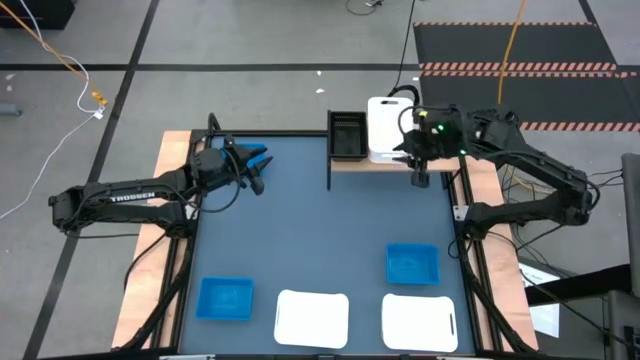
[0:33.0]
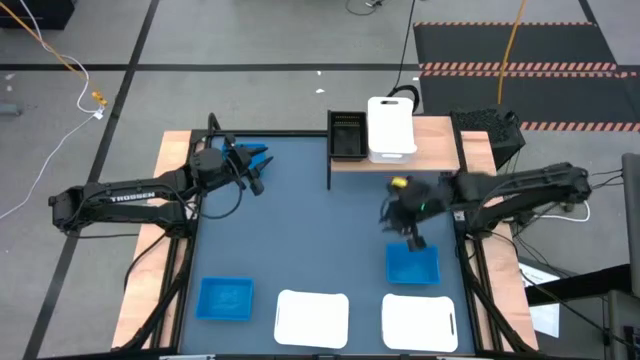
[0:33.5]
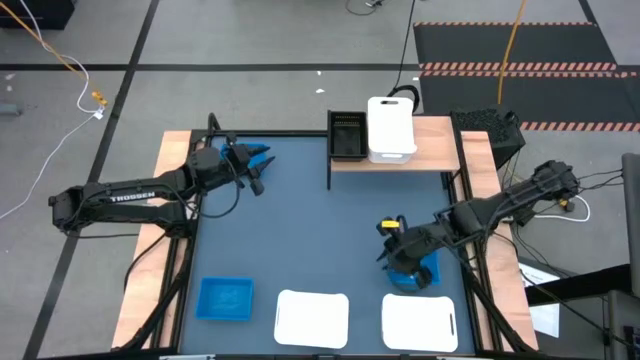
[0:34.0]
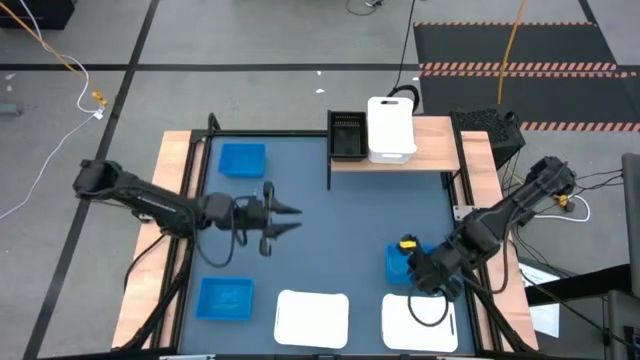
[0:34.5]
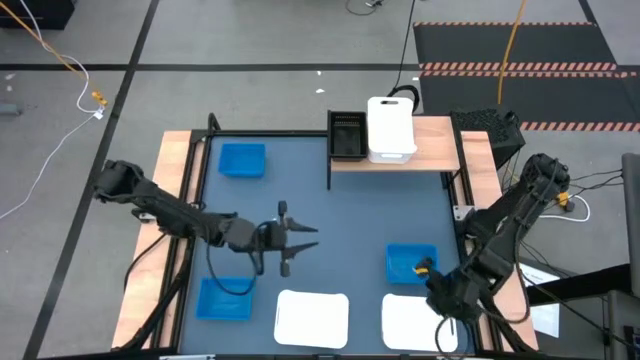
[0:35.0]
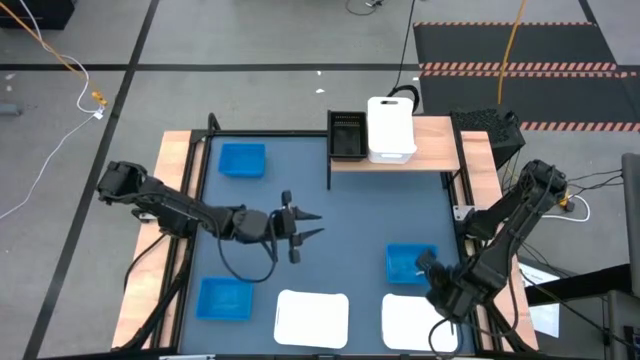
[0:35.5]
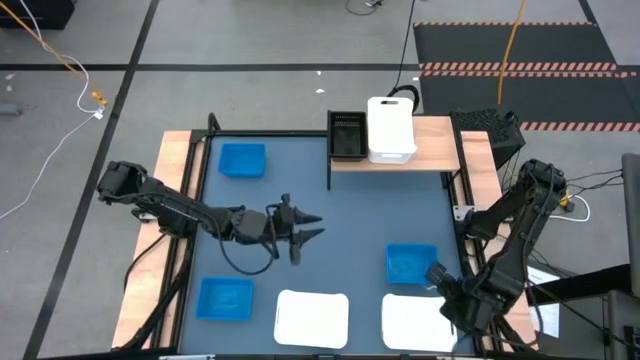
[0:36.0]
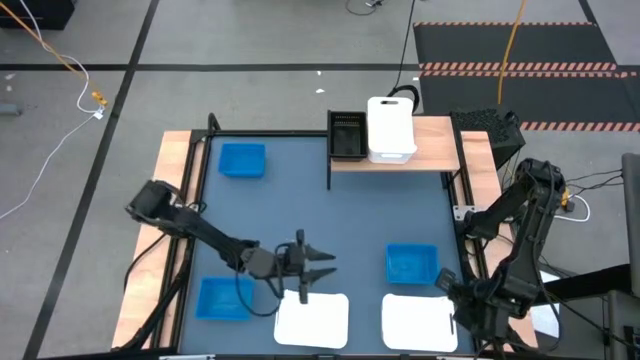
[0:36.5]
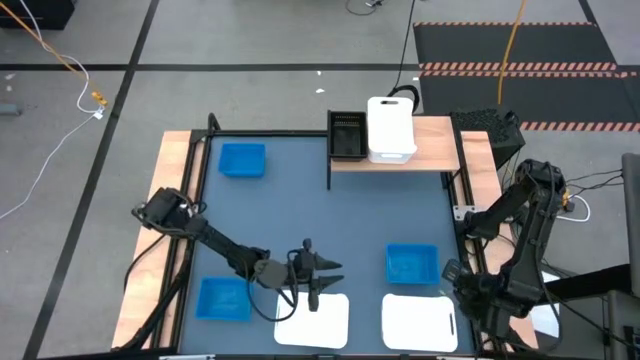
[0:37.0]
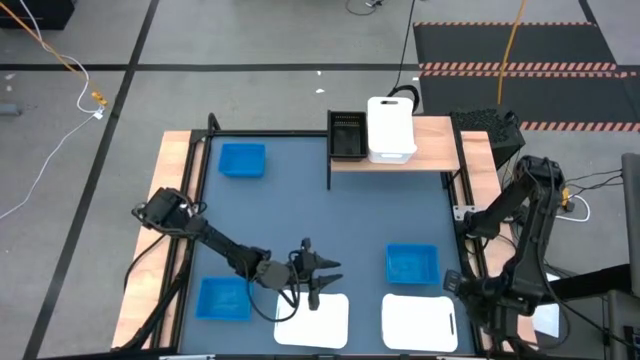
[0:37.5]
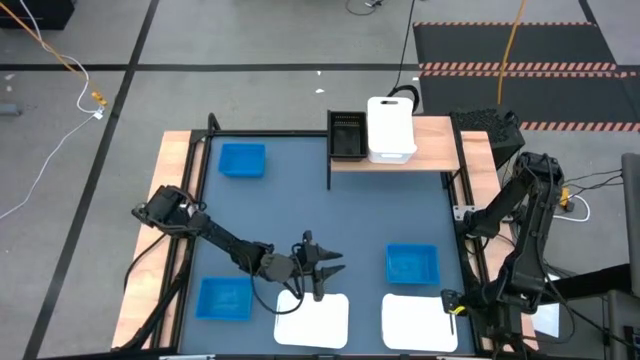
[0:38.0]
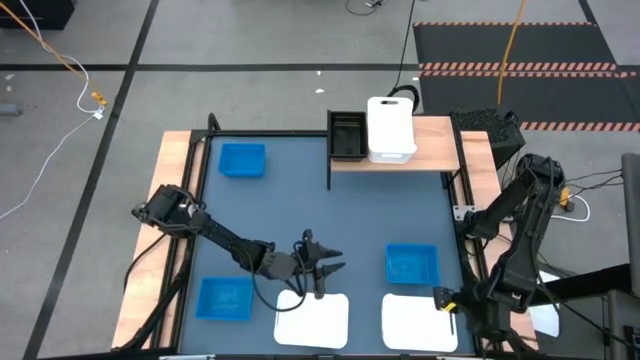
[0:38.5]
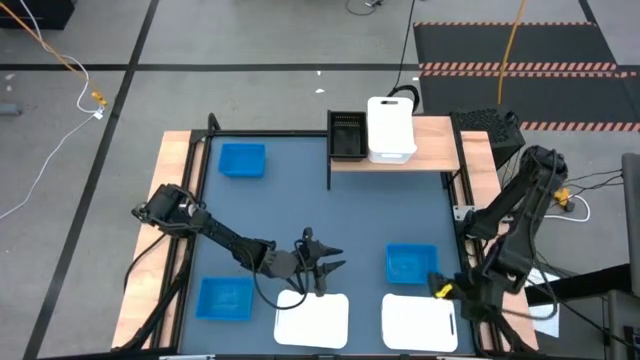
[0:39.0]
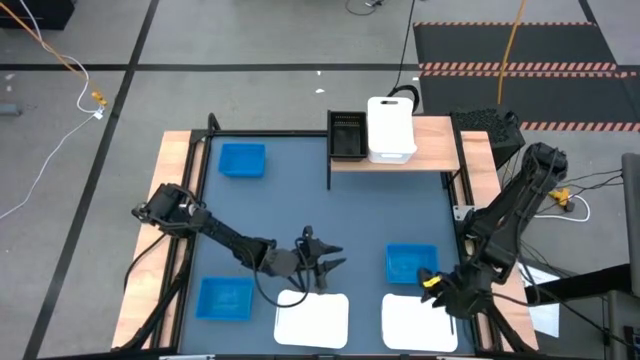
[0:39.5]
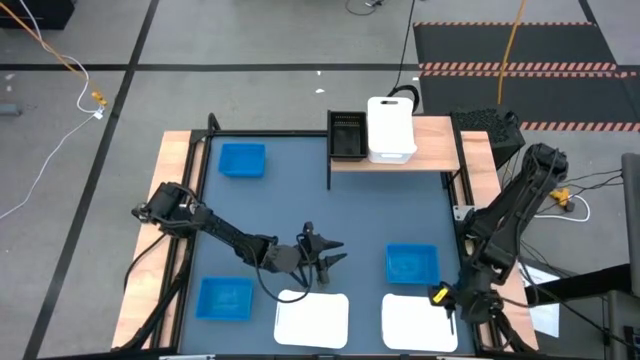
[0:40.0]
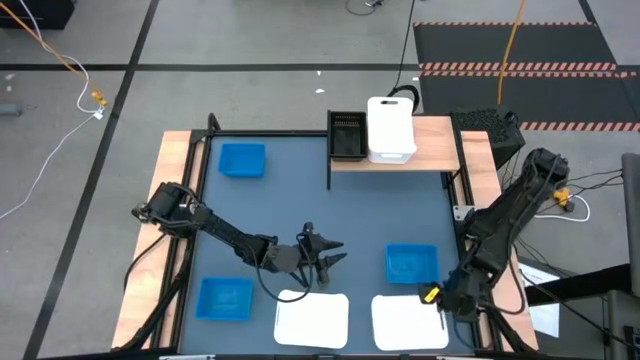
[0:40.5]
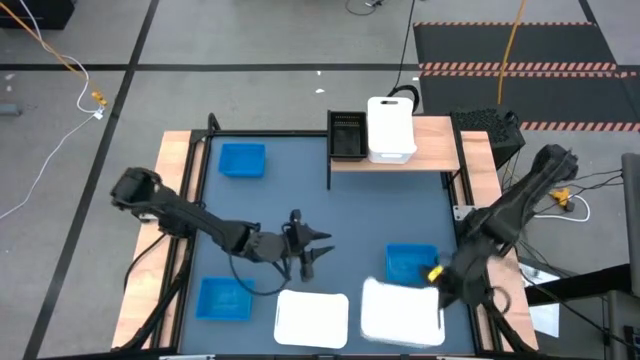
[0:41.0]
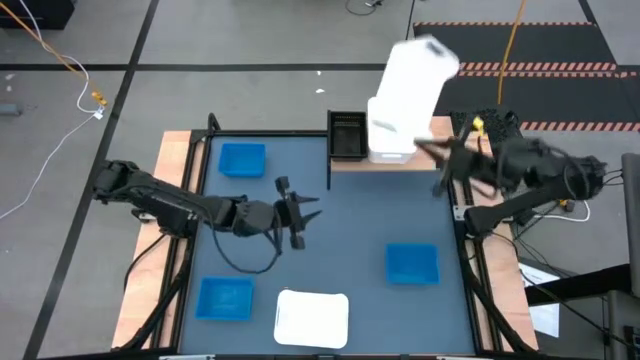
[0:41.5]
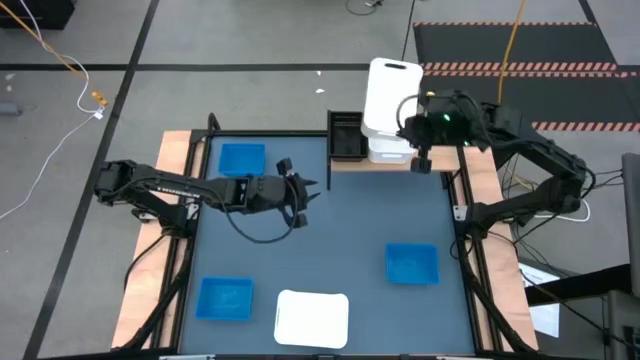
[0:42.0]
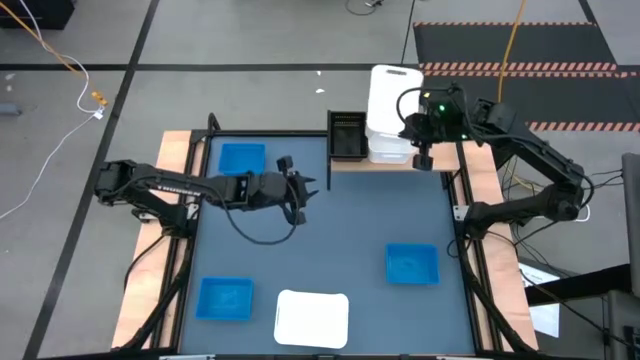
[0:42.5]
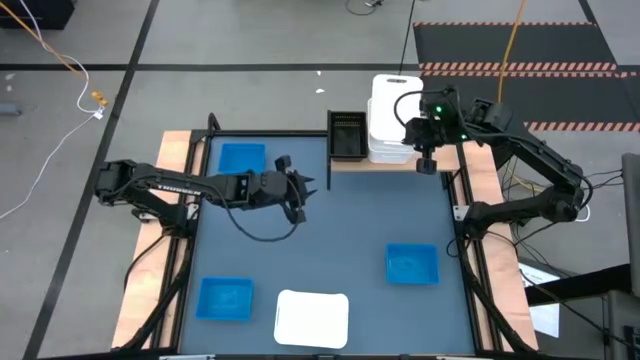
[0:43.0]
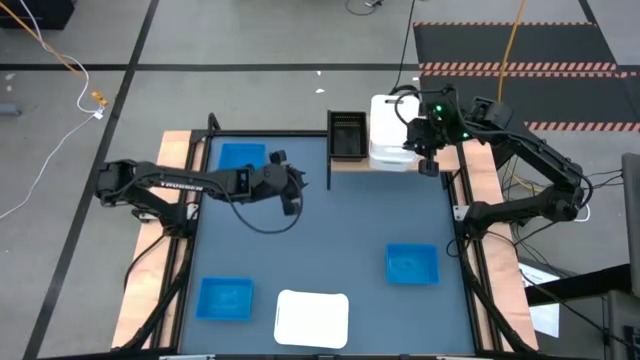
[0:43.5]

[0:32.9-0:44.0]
Task: Stack baskets on shelf by color
Stack the right white bin on top of the white bin into the shelf

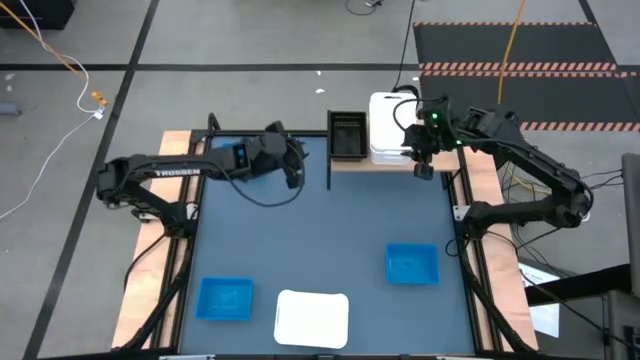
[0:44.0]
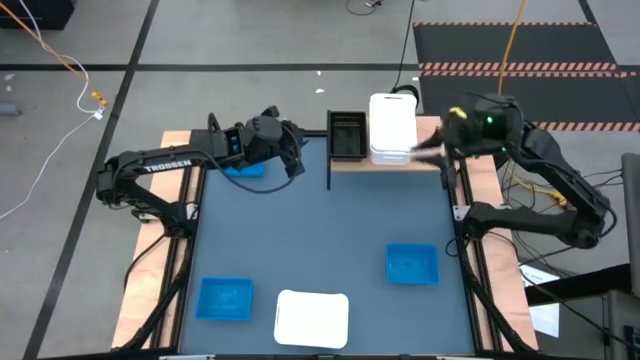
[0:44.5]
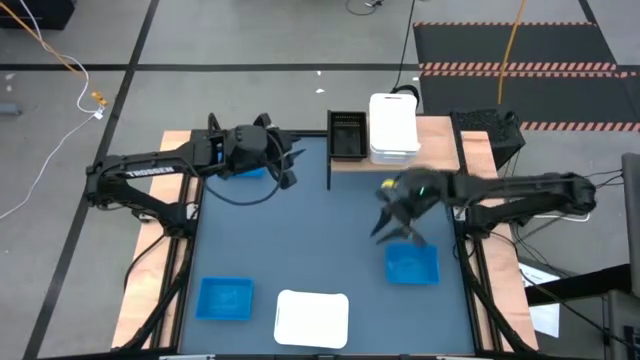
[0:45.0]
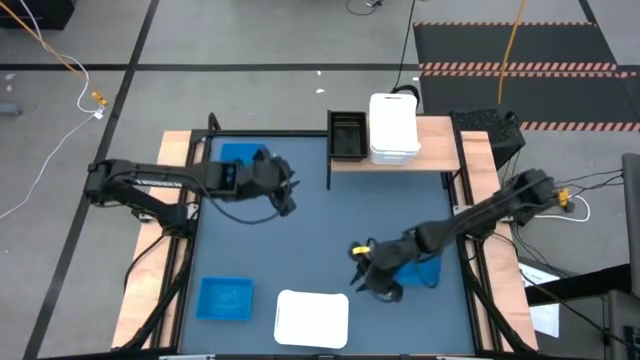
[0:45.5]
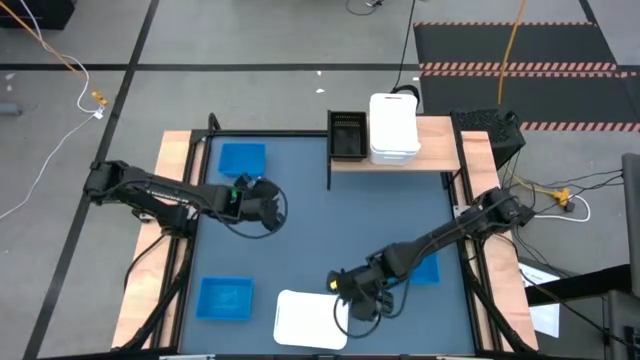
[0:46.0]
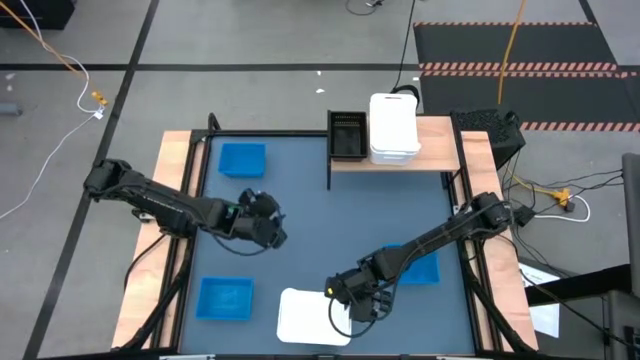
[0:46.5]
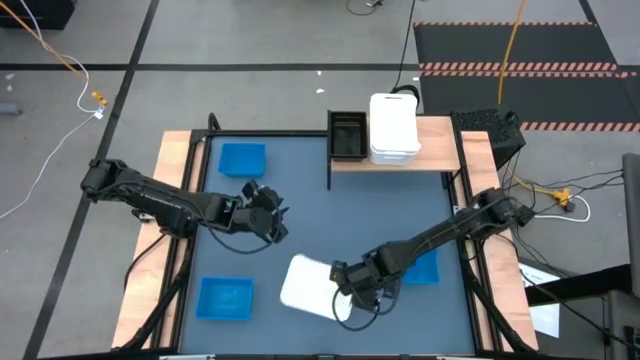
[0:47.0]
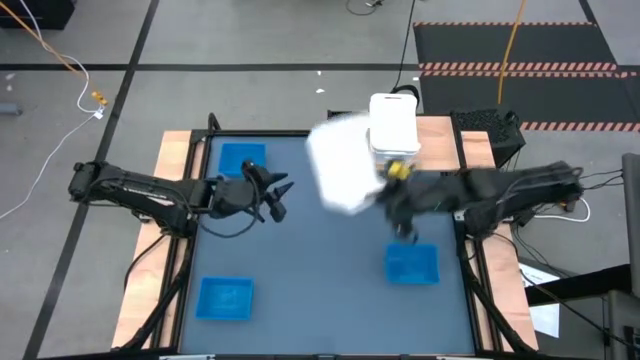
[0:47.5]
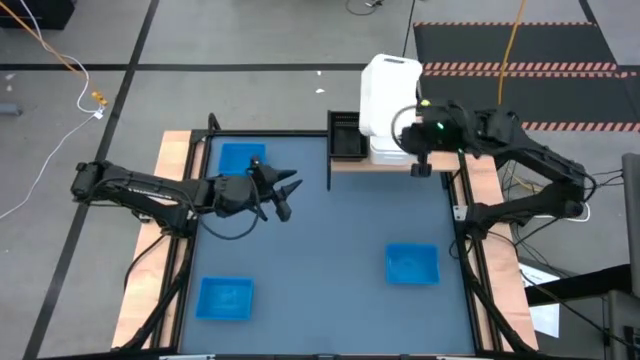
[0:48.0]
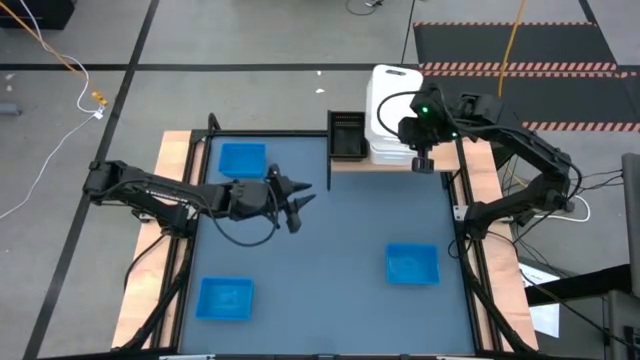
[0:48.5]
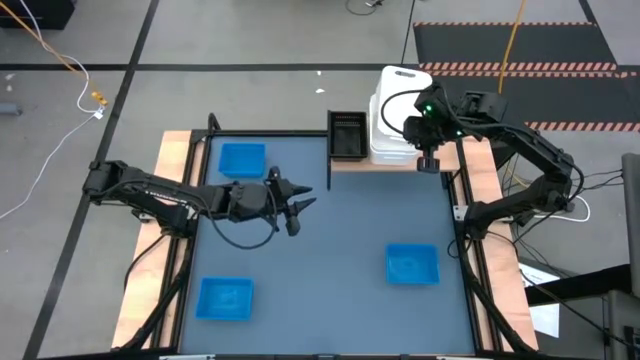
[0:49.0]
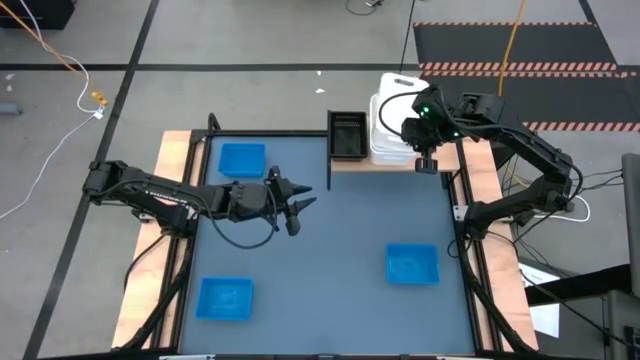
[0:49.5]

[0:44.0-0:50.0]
Stack the white bin on top of the stacked white bin into the shelf

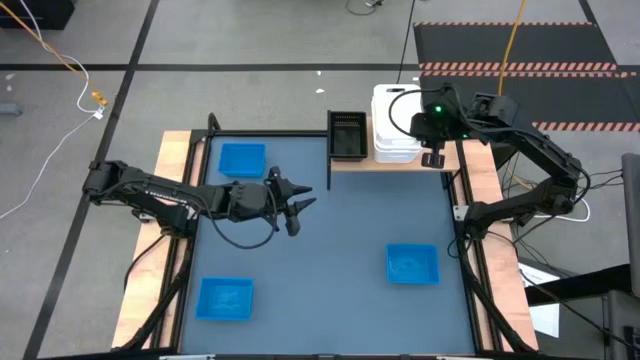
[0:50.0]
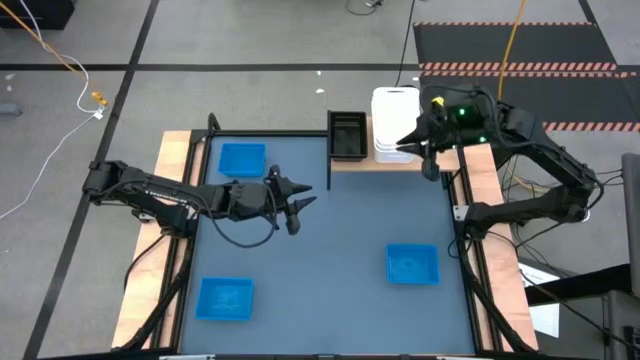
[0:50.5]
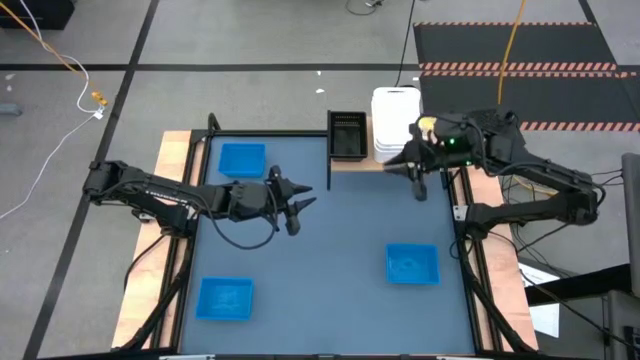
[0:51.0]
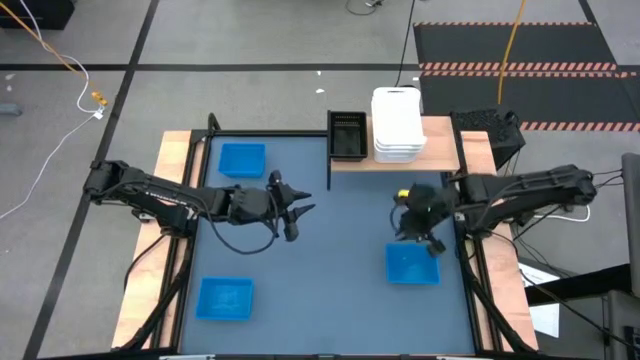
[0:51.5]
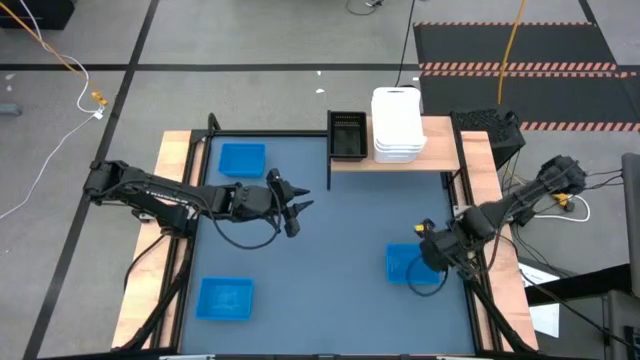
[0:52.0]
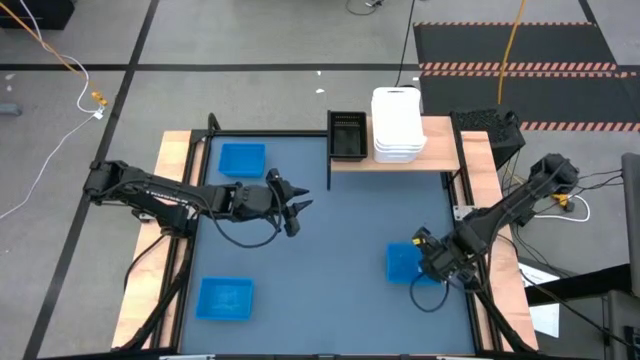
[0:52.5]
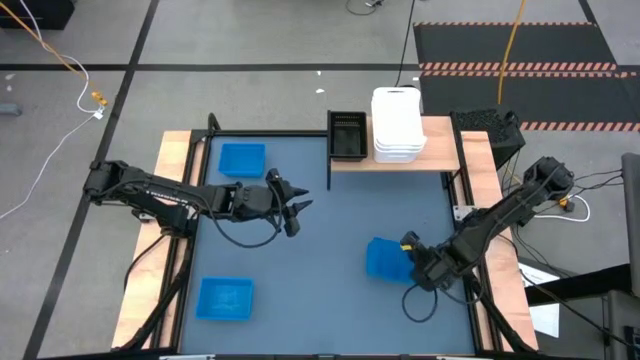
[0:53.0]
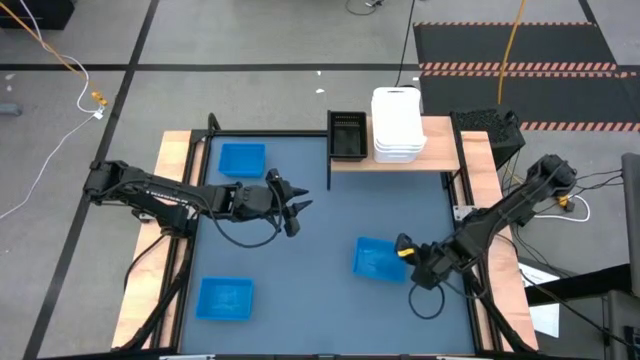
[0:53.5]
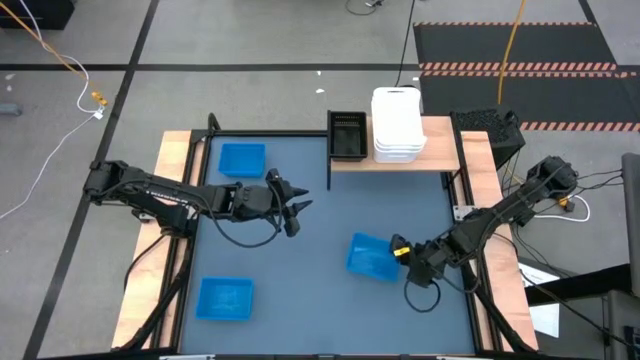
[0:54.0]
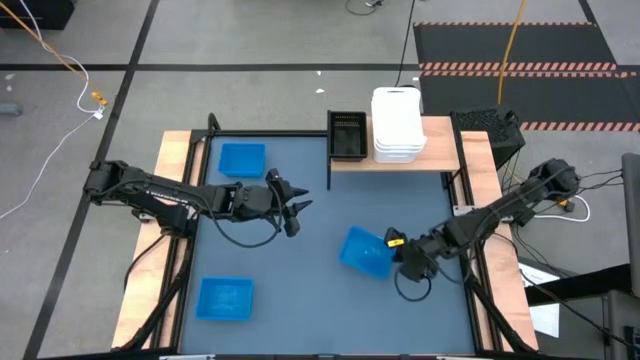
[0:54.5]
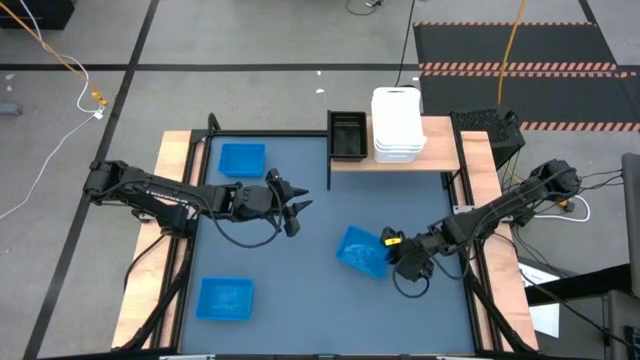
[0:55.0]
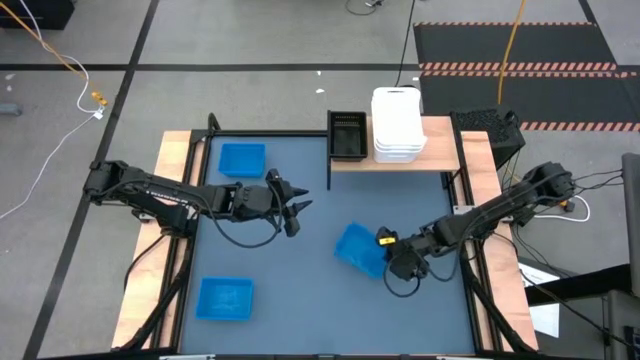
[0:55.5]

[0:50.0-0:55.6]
Put the middle right blue bin into the shelf
